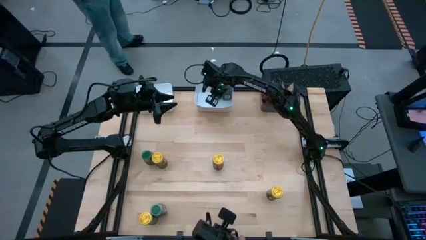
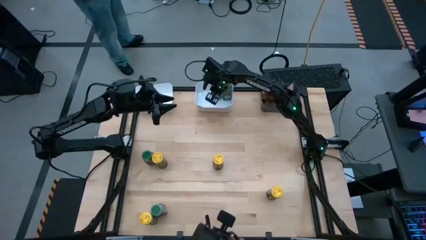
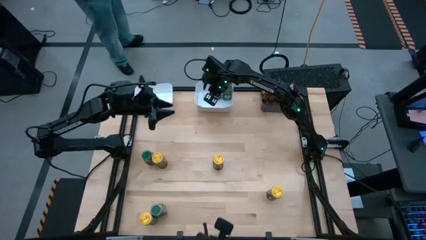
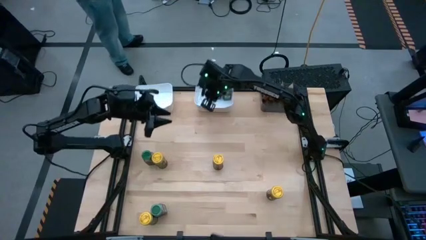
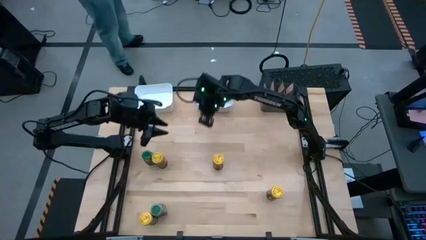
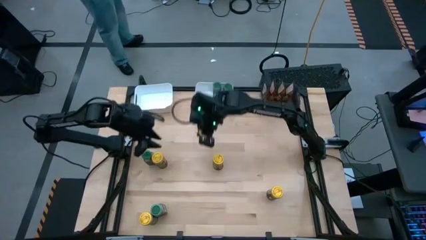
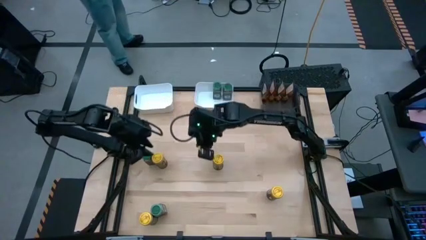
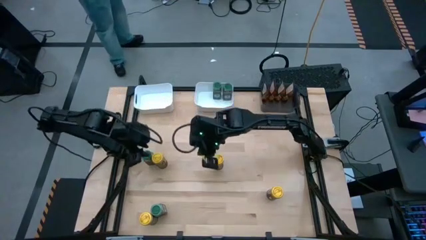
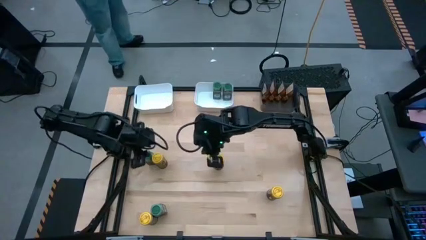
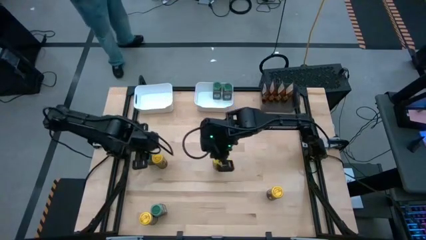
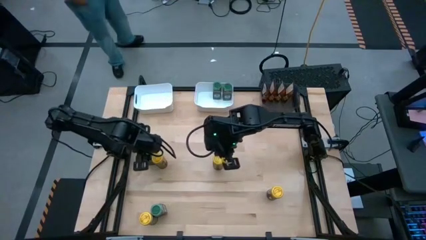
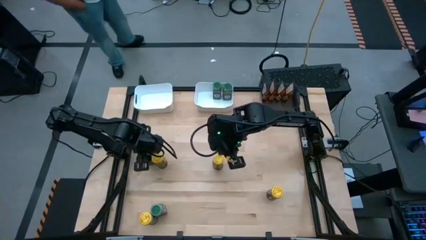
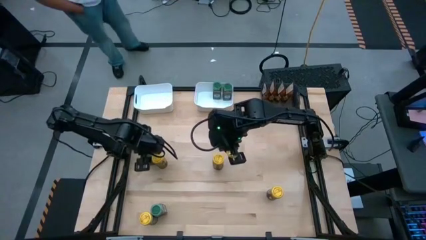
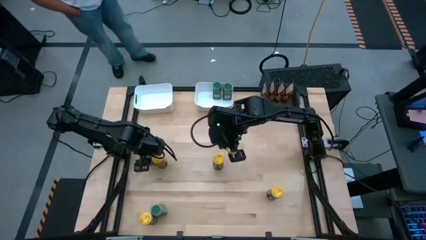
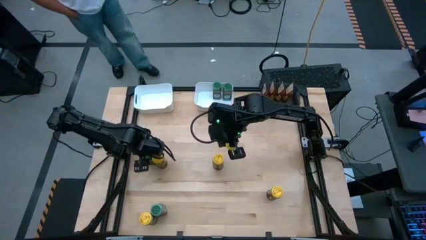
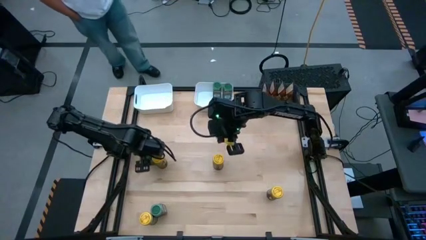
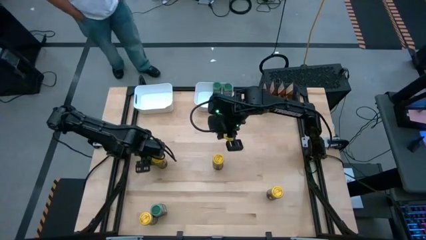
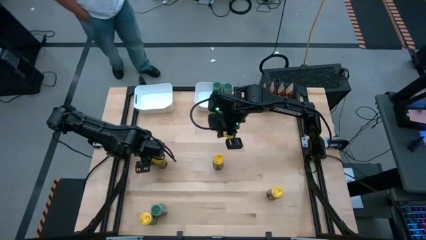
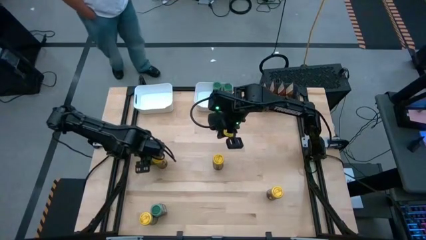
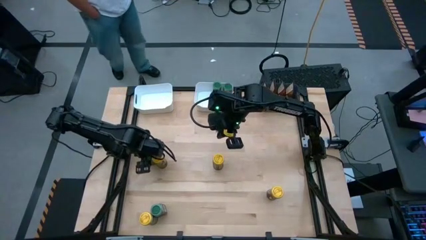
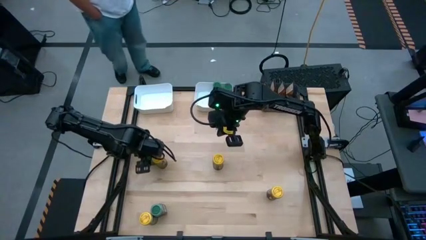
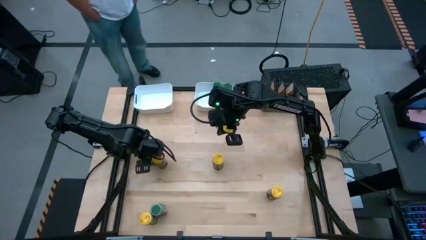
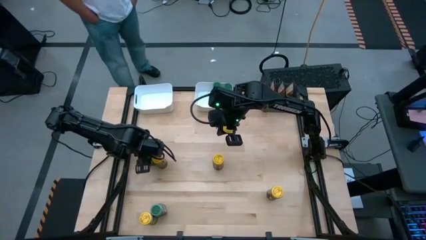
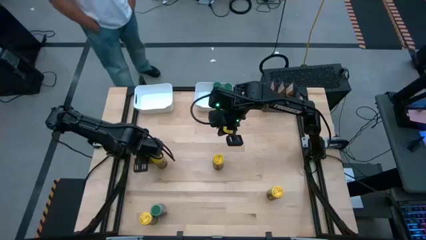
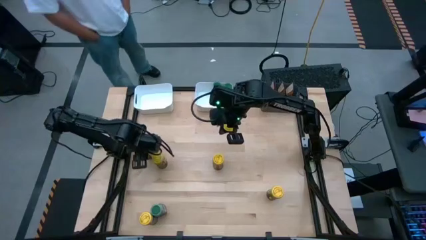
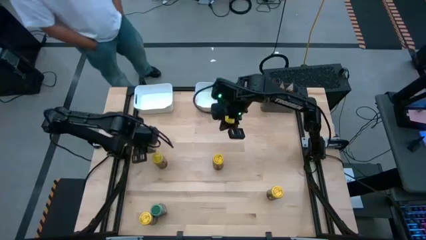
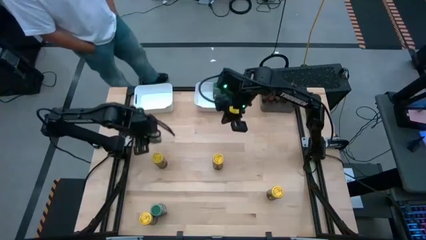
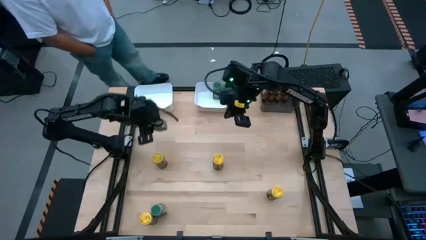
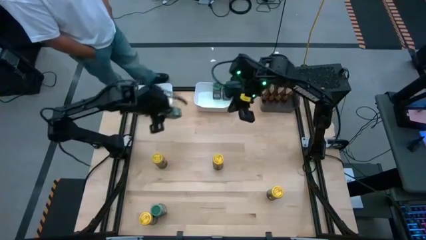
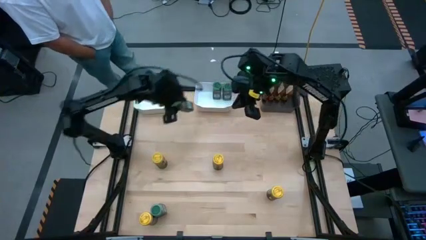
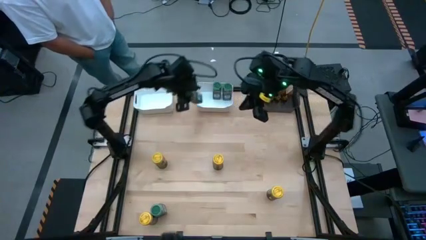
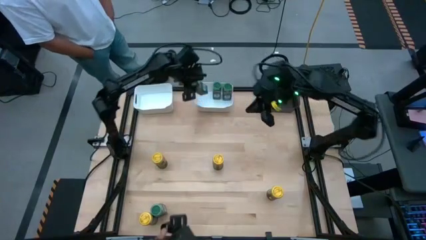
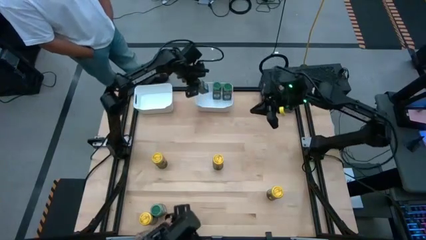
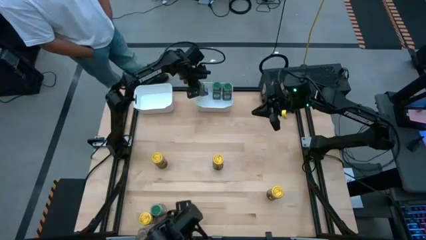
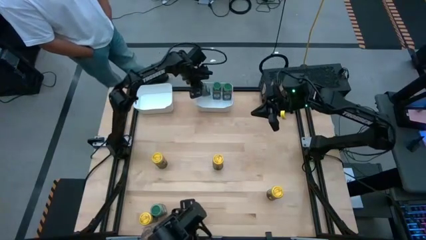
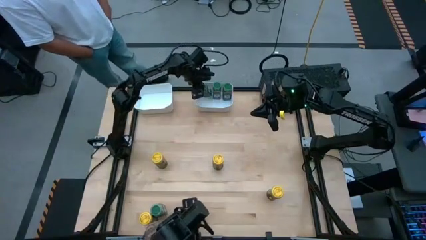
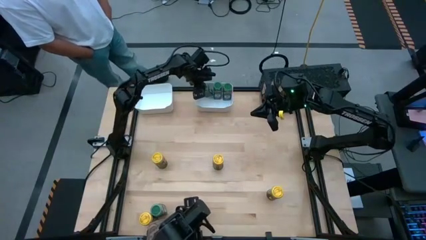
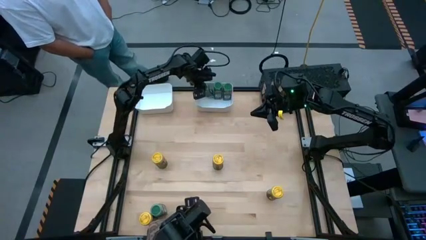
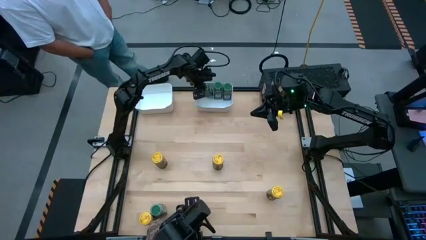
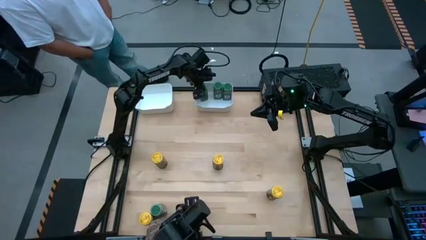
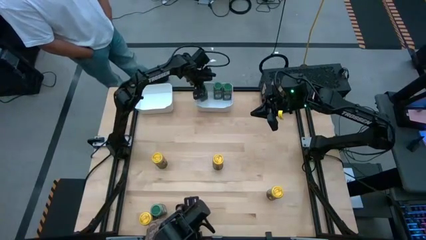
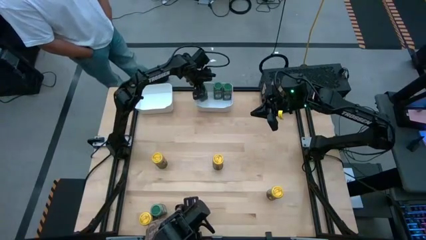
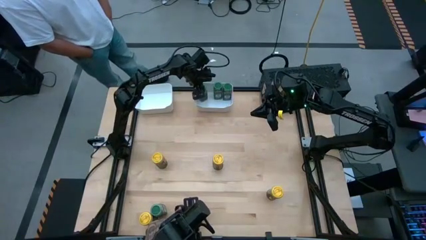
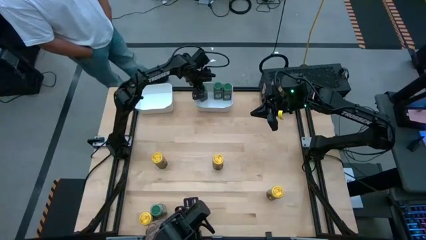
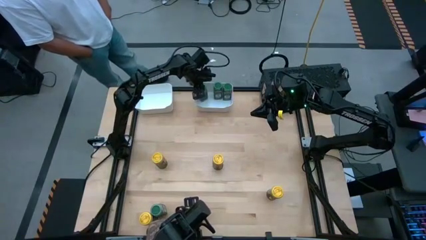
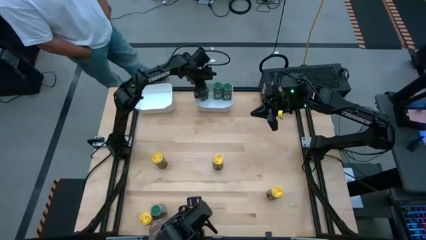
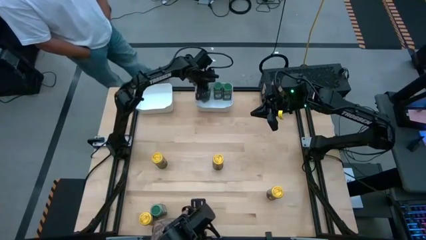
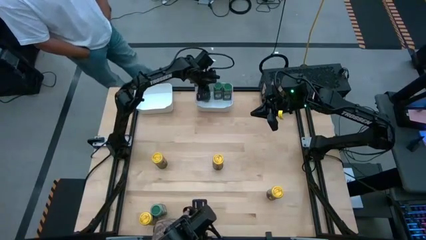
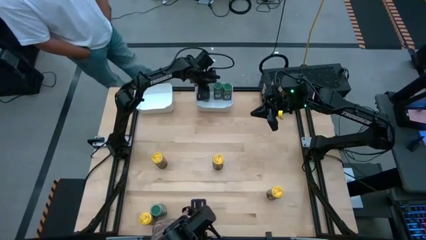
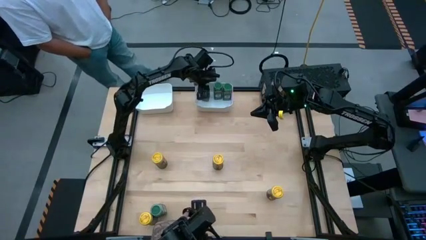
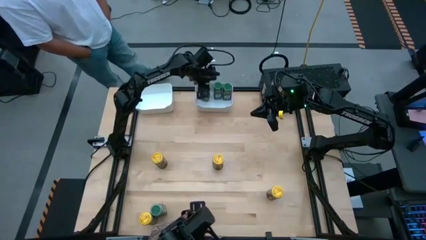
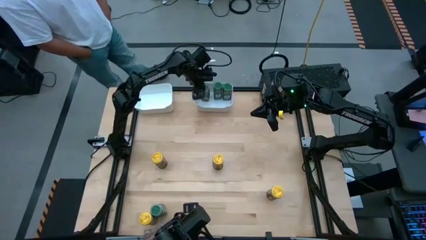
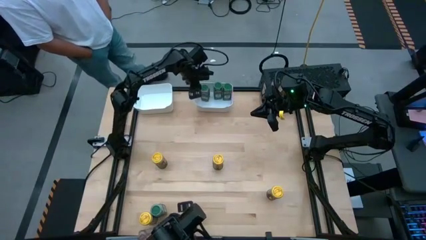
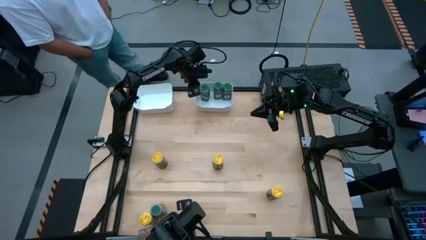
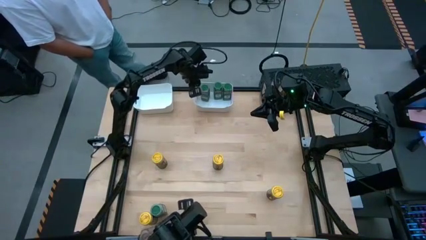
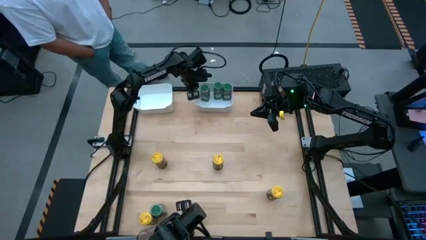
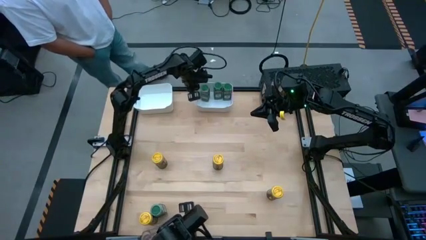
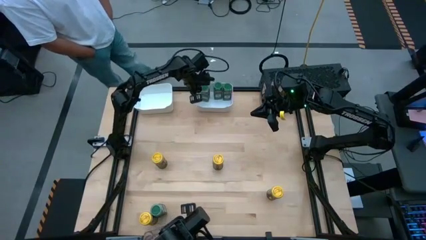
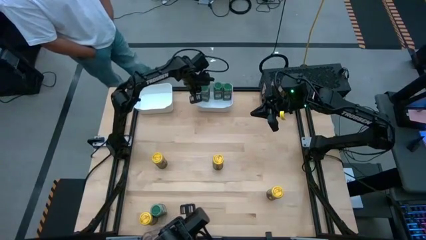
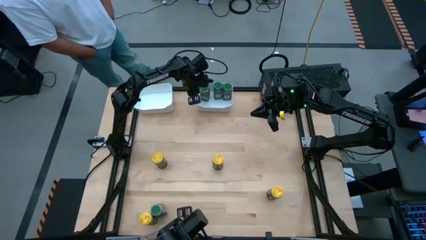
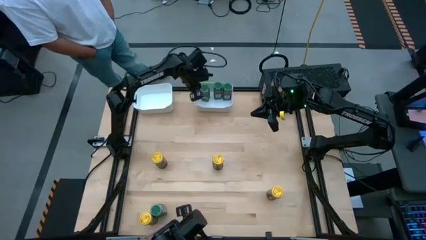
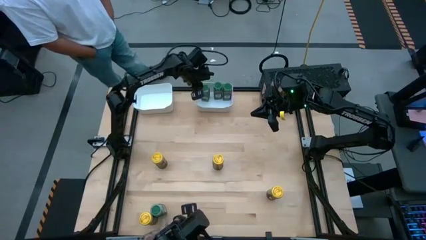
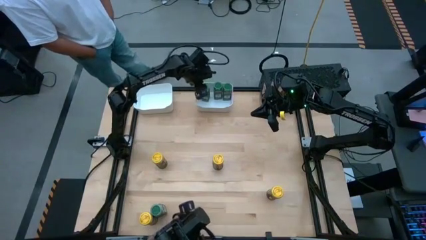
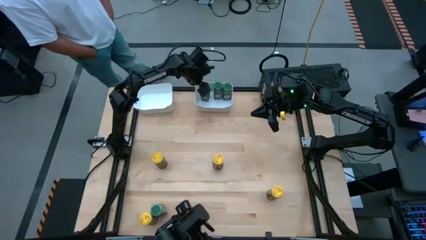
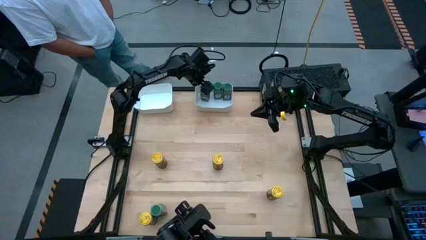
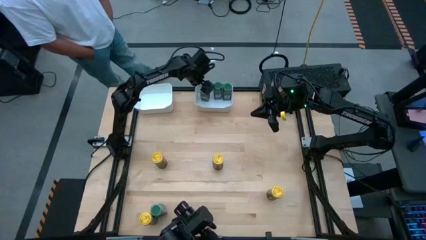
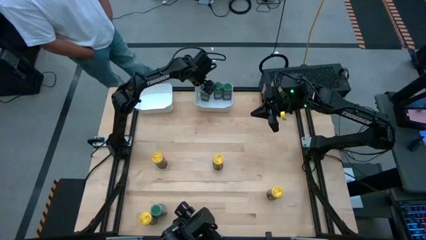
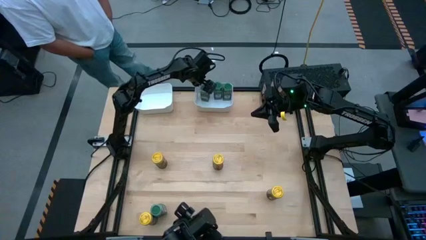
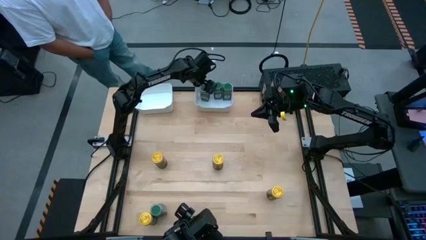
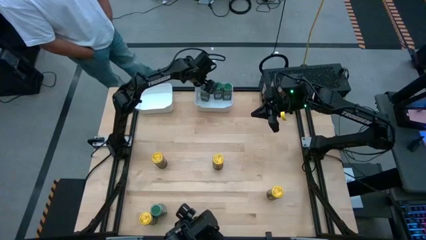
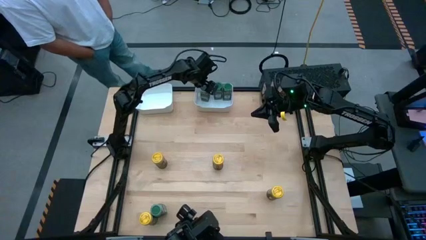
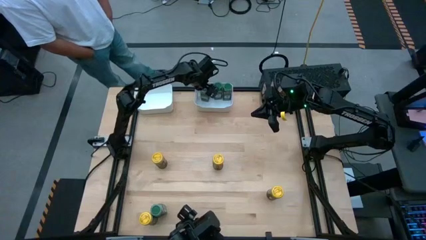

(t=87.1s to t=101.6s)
Task: Sort spices by type
Put the top green seasoning bottle into the right white bin

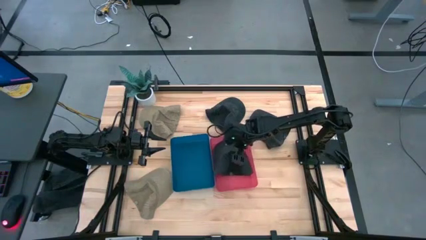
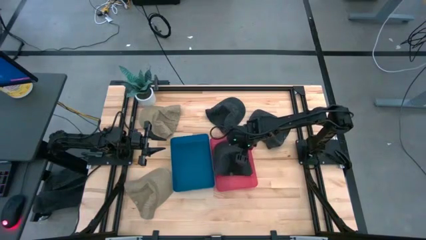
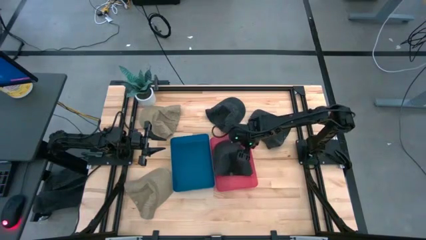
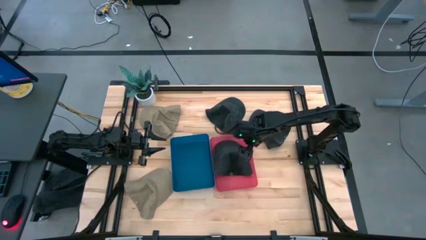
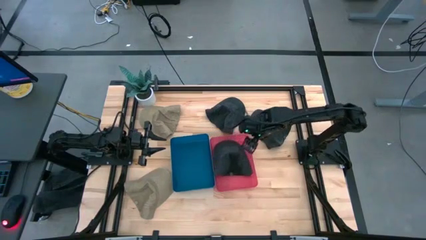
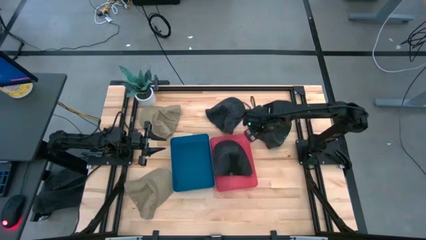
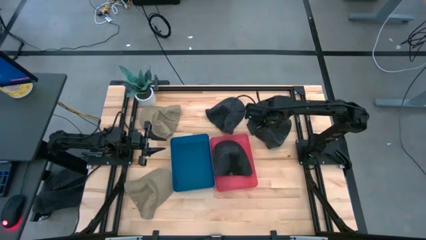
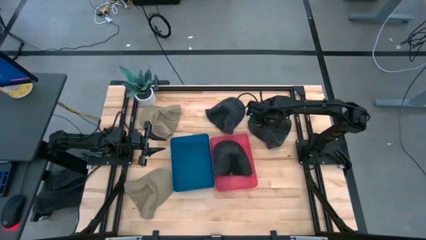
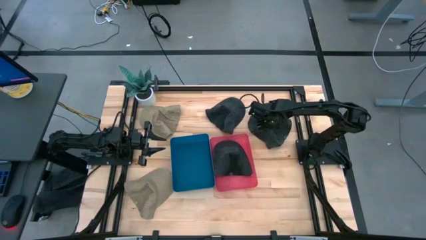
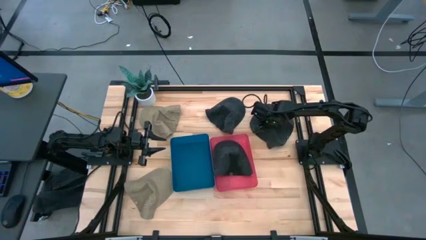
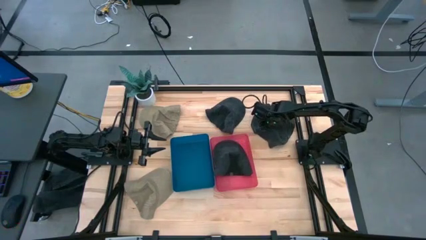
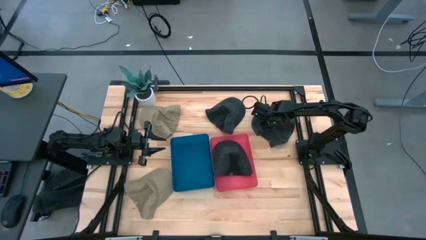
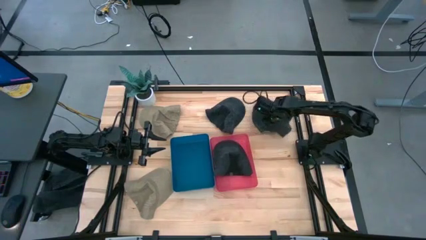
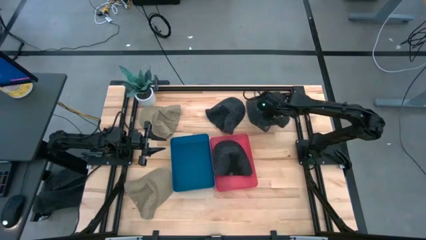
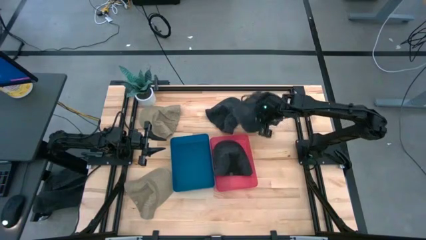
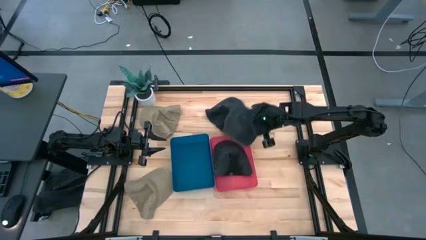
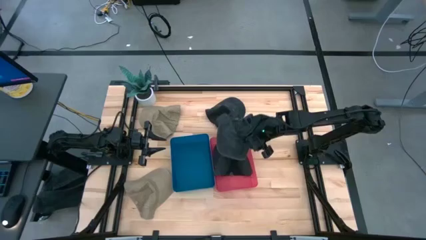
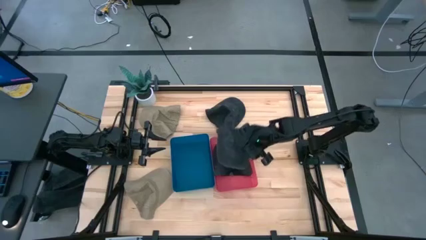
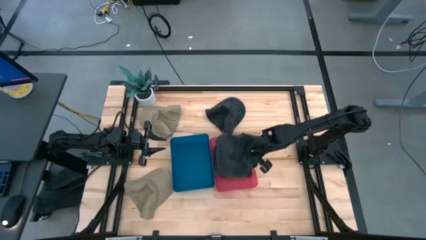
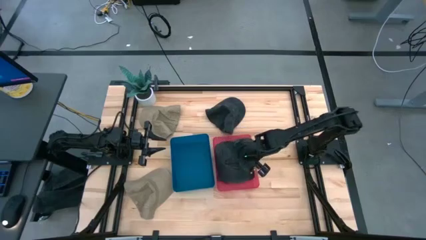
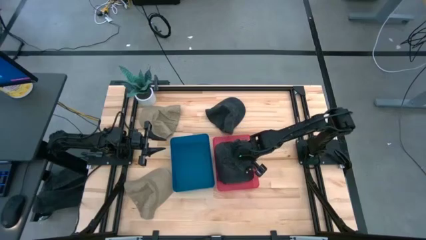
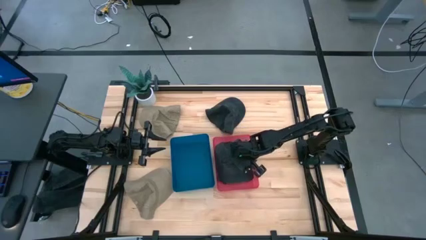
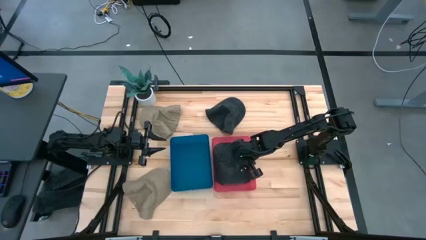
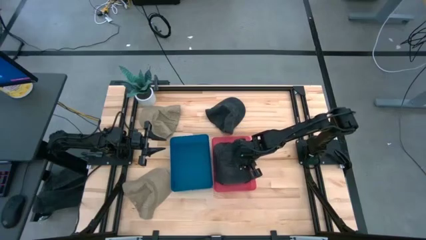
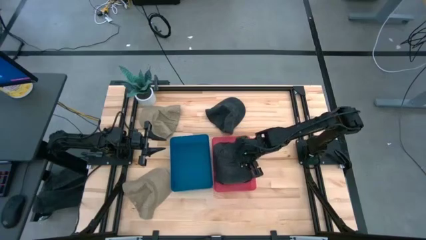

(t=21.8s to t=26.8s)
Task: Pick & Place hat
Put the right black cap into the pink bin
